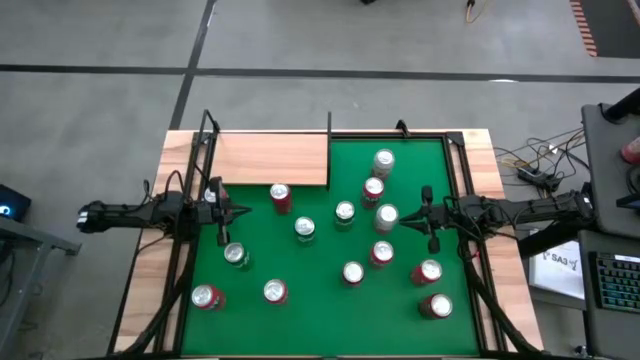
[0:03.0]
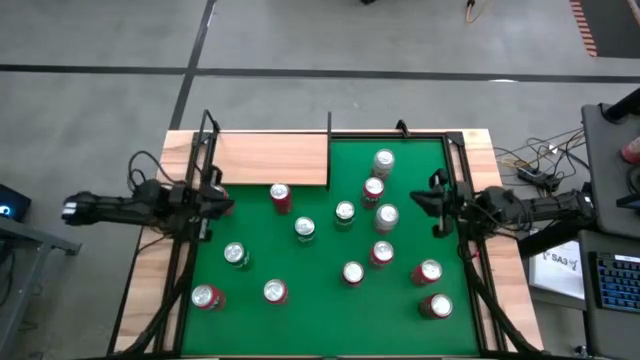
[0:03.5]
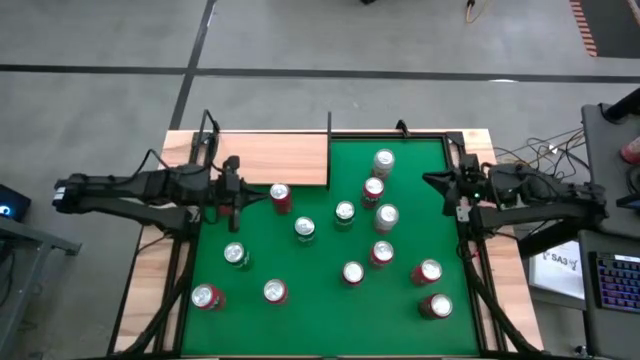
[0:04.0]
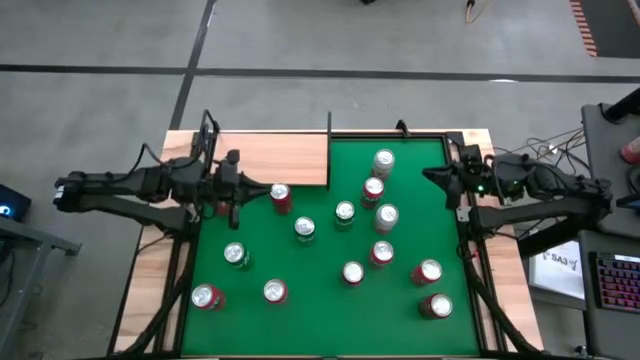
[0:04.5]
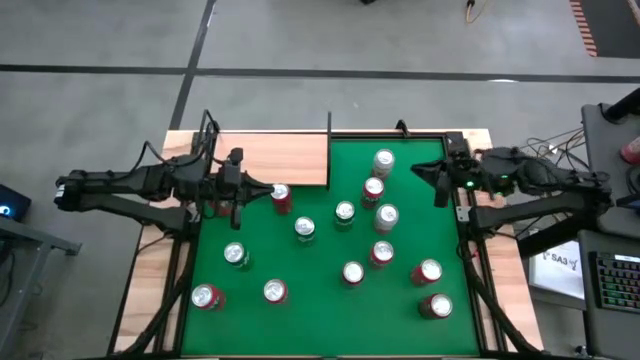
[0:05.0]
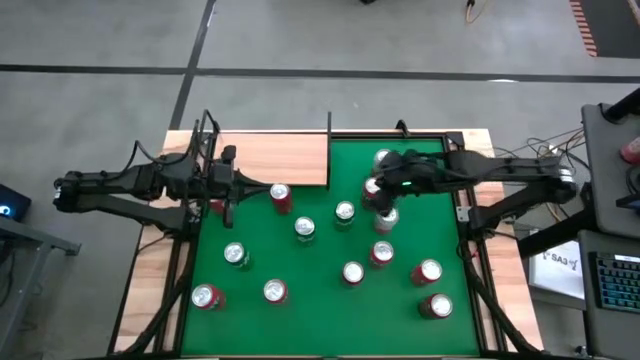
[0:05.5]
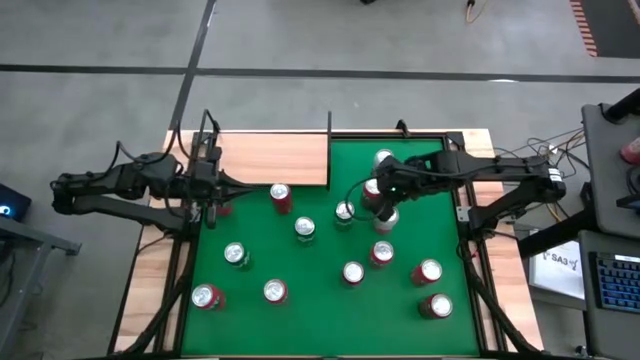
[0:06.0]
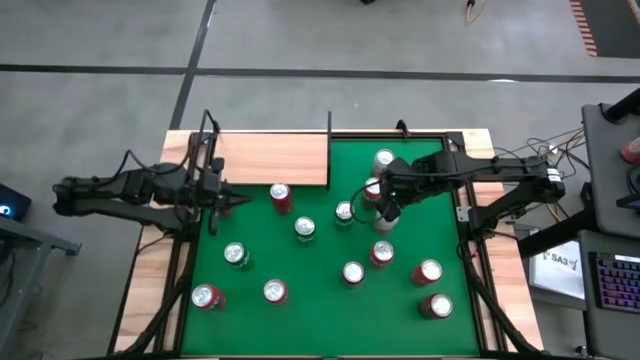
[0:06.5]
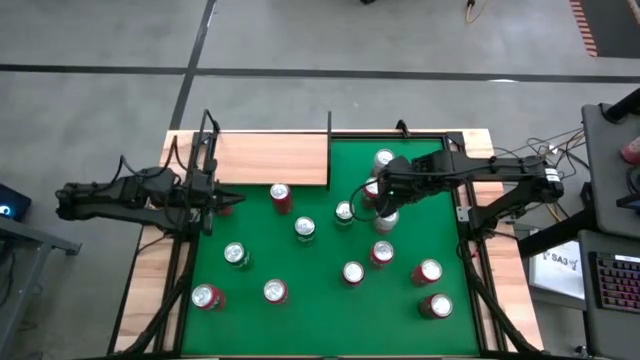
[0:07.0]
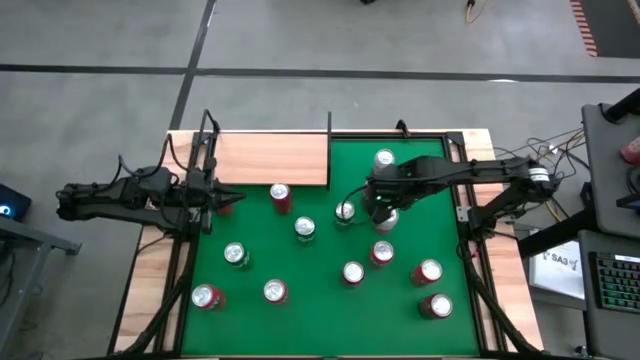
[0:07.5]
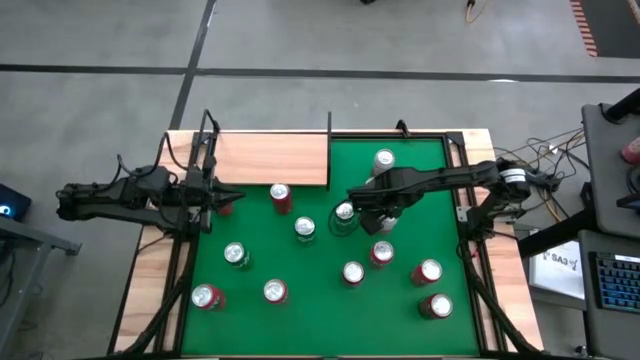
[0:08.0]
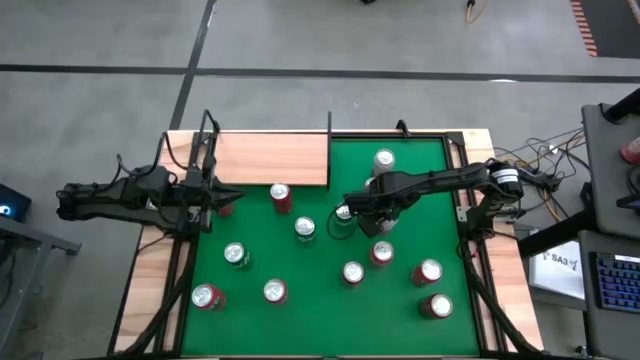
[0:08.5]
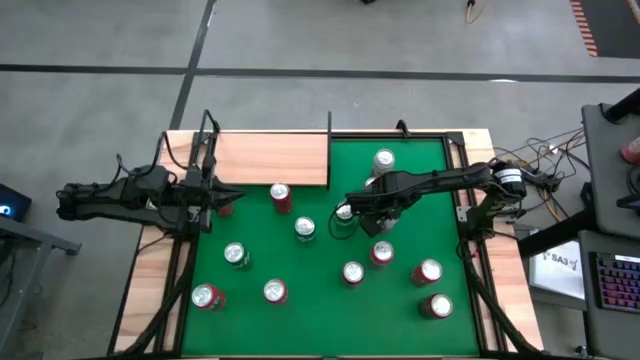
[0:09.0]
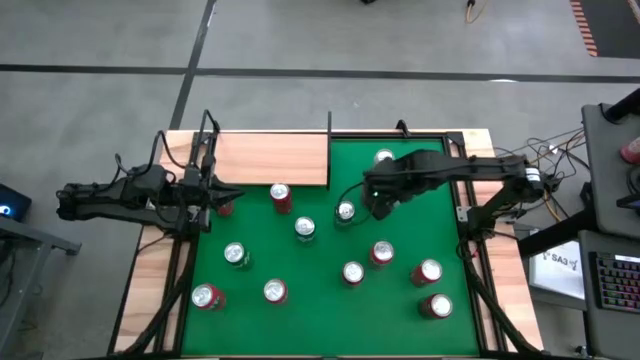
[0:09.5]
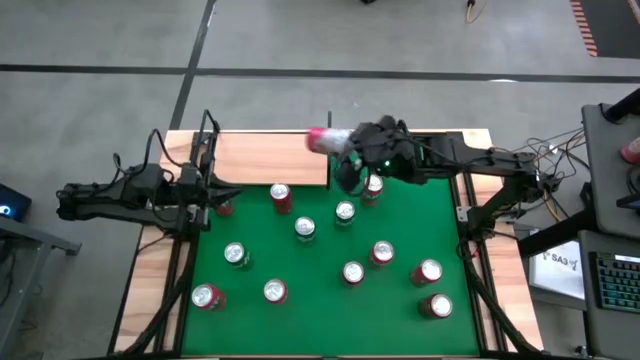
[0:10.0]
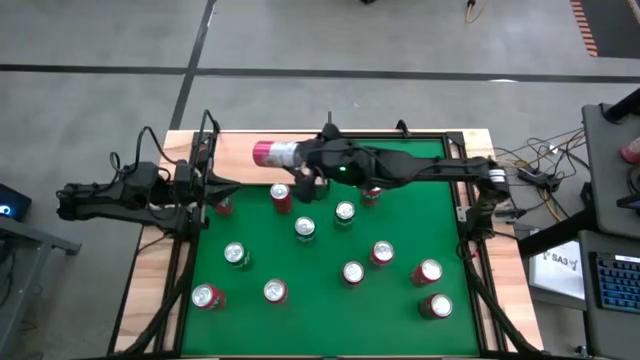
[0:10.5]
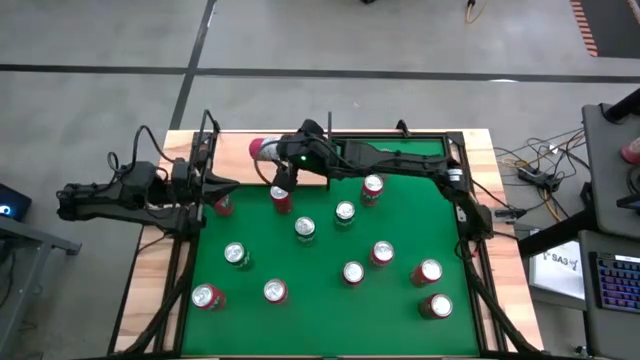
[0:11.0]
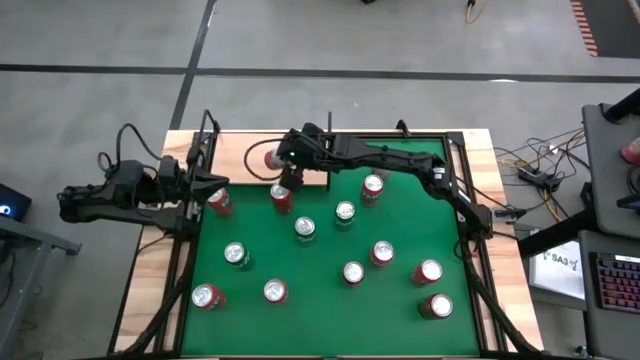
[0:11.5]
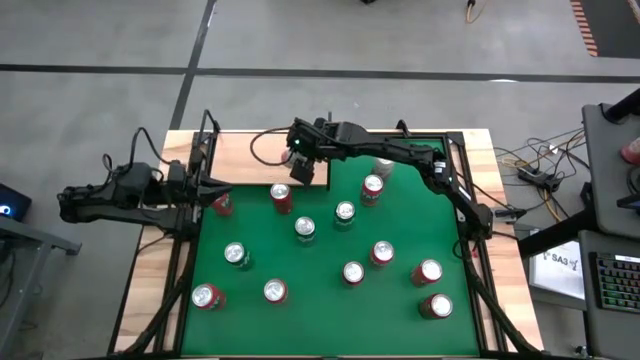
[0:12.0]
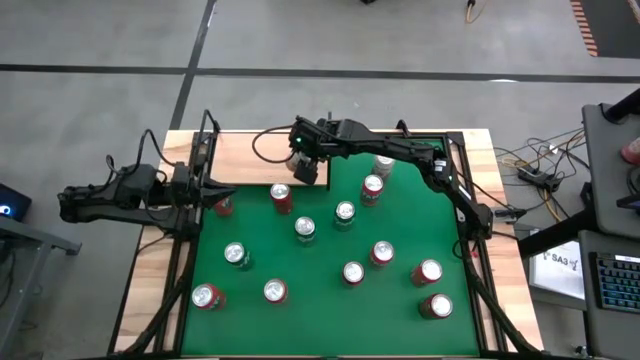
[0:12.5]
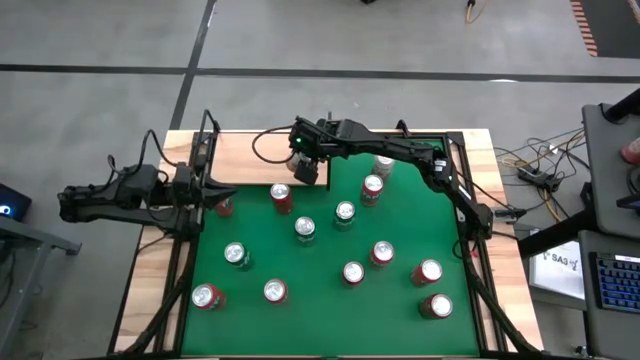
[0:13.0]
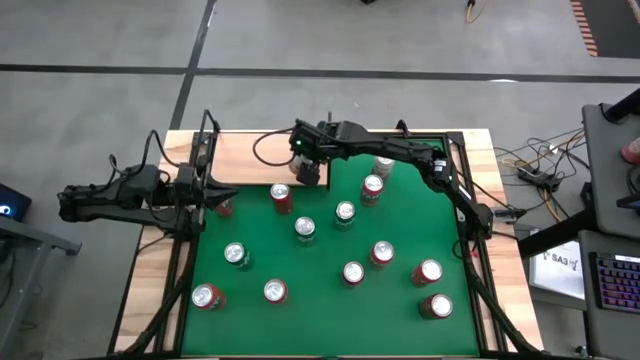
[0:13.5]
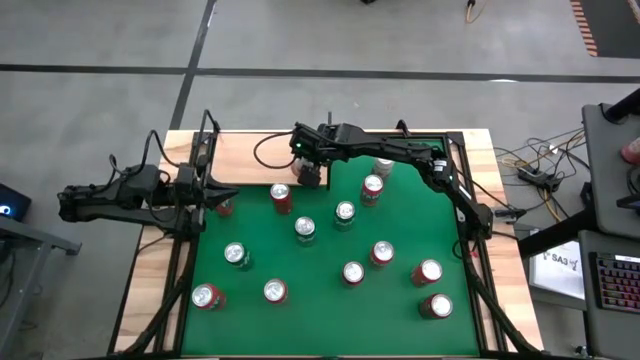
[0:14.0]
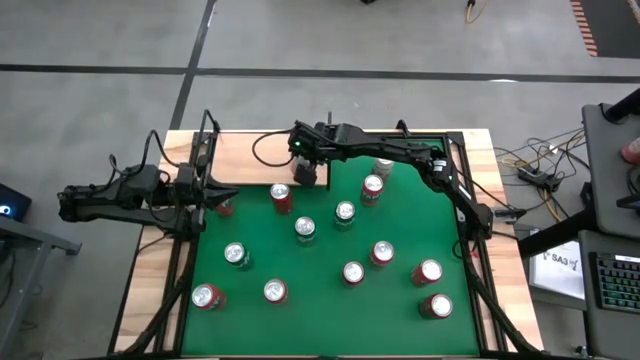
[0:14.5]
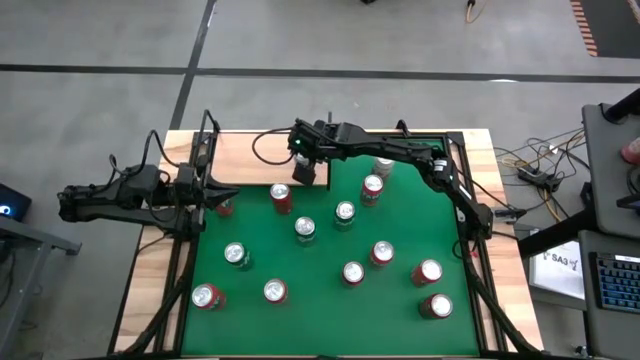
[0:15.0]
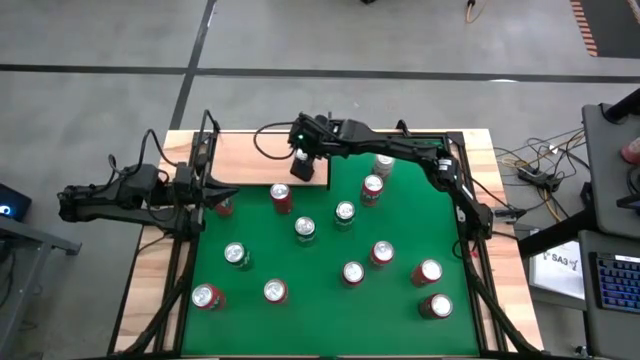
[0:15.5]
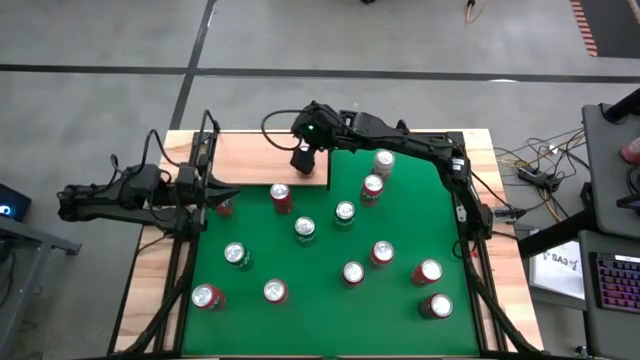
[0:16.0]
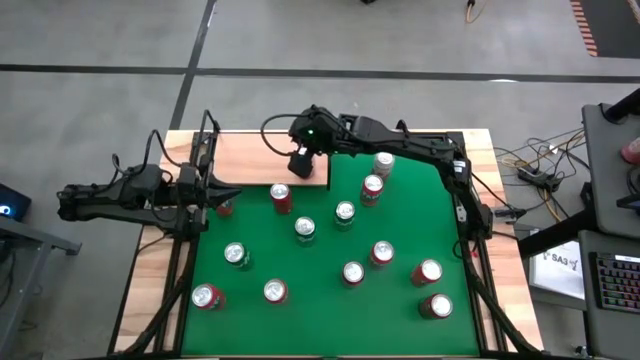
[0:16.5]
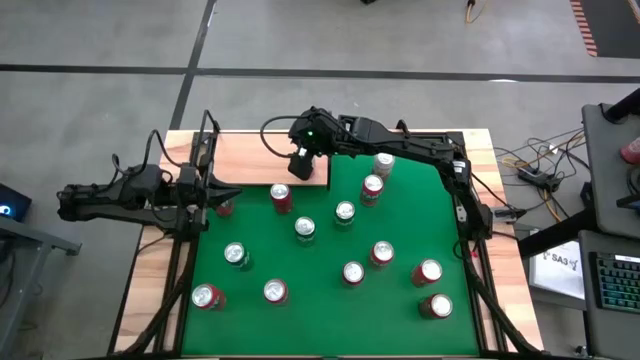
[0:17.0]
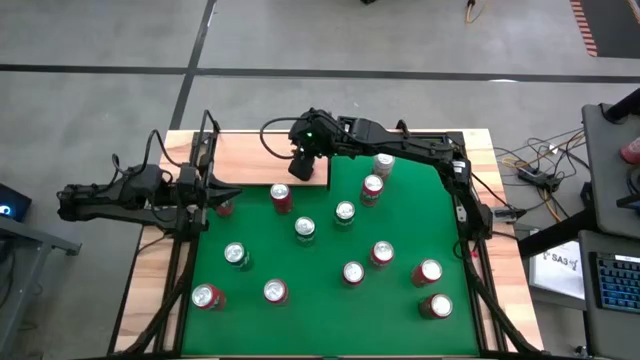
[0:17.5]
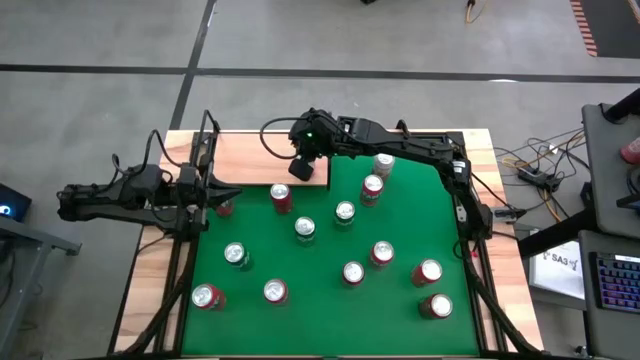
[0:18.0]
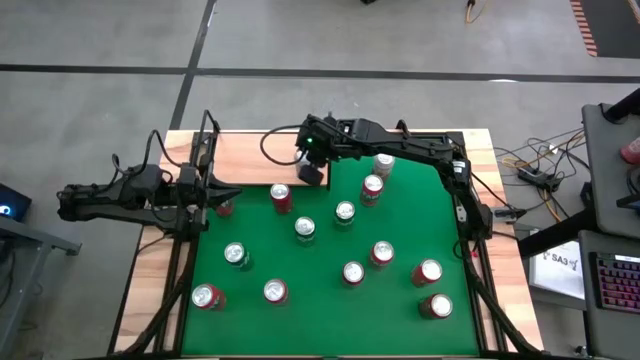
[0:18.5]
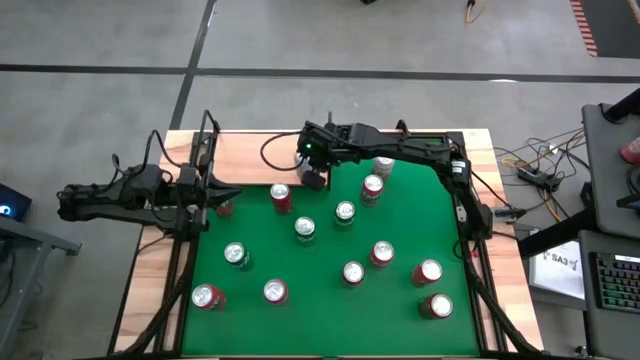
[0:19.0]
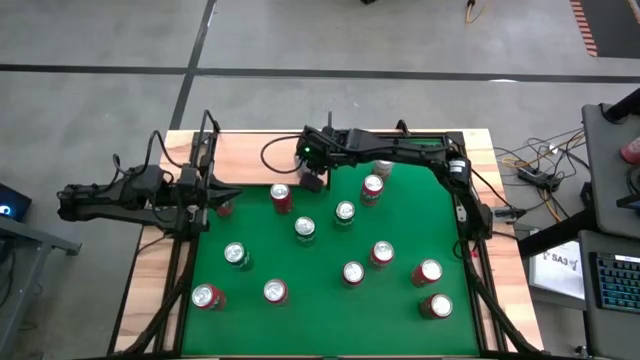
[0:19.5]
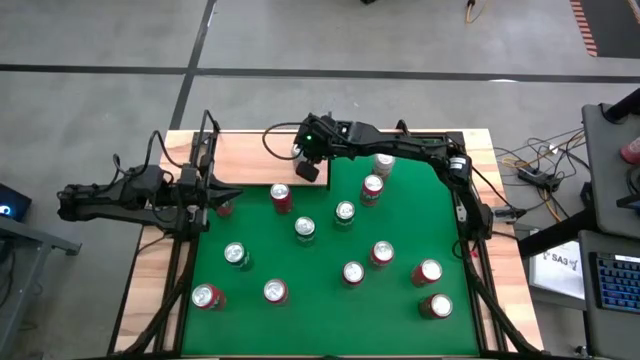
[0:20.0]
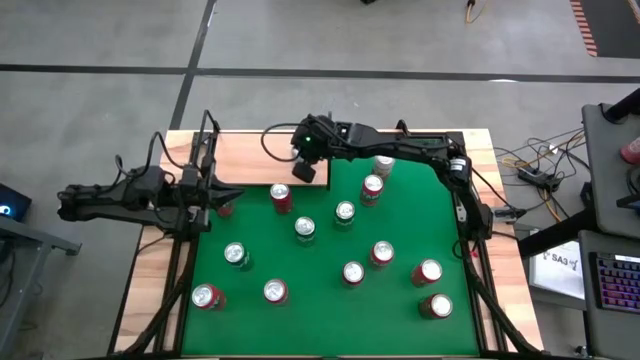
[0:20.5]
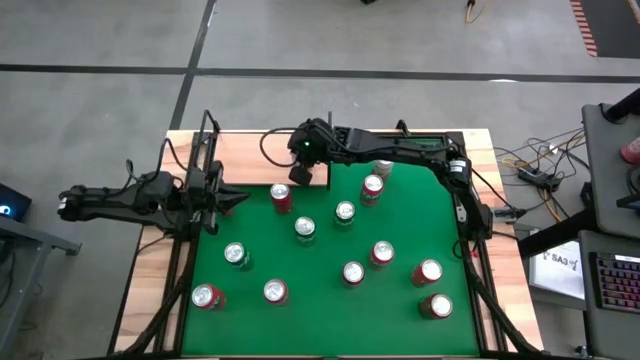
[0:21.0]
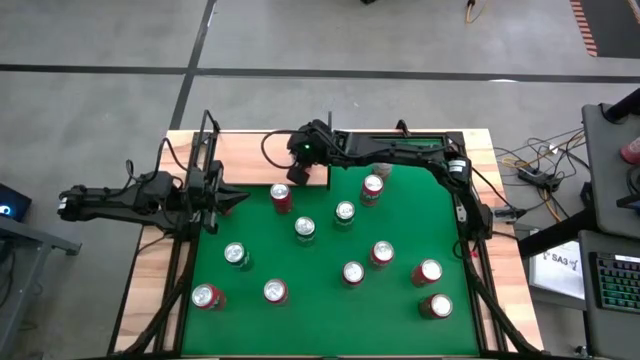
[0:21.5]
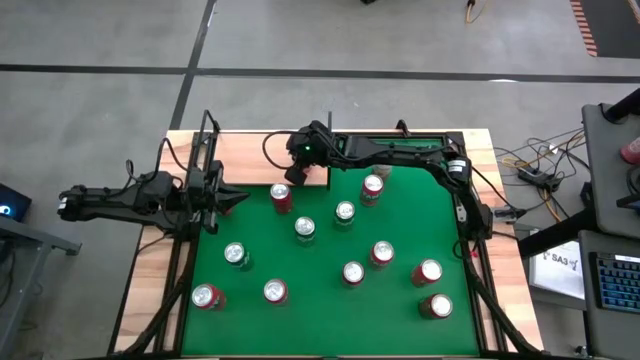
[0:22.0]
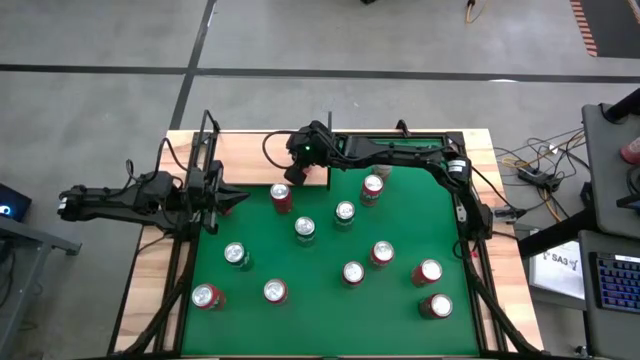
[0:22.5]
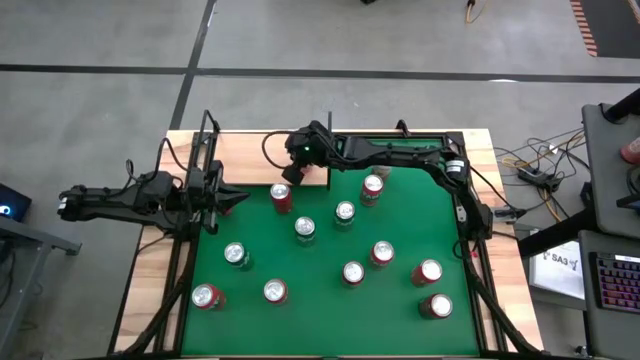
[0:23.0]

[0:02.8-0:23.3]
Task: Place canned beverage on shelf
Put the pink-white soda can on the shelf
